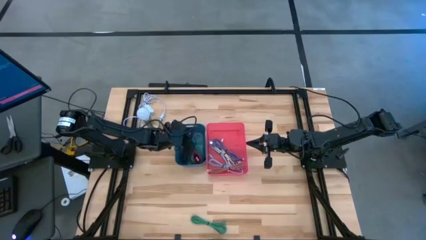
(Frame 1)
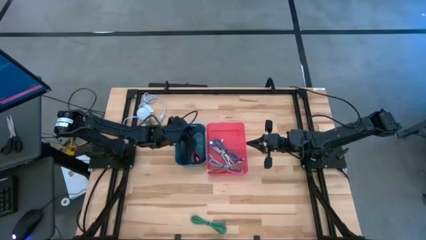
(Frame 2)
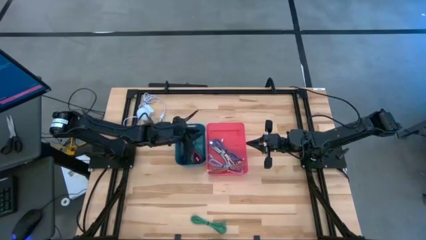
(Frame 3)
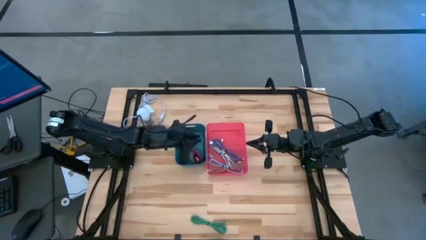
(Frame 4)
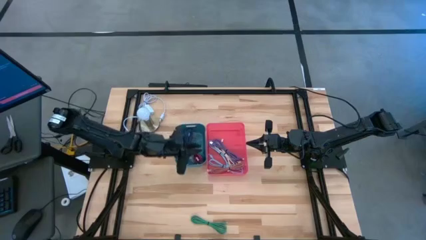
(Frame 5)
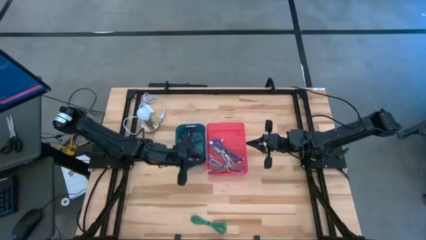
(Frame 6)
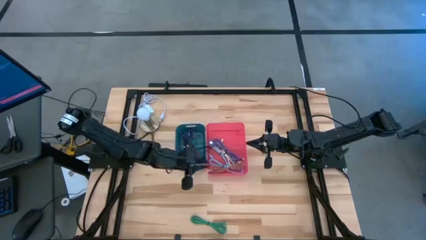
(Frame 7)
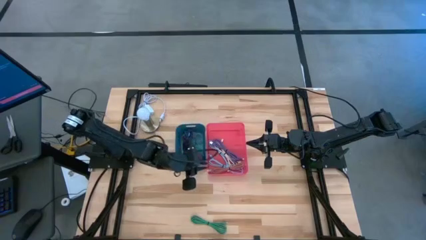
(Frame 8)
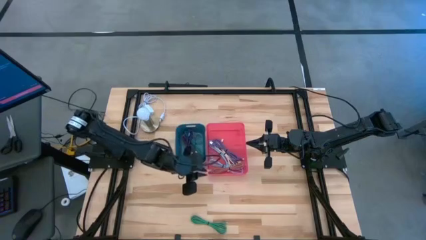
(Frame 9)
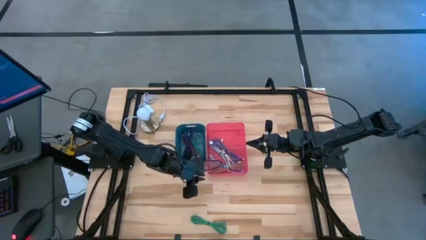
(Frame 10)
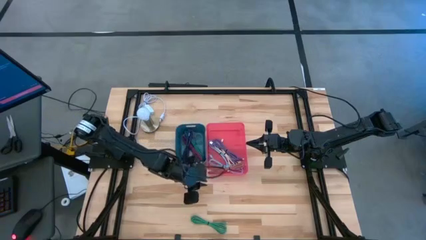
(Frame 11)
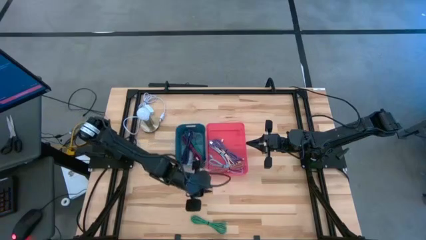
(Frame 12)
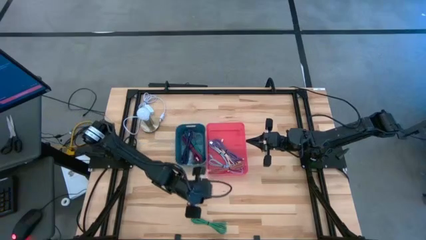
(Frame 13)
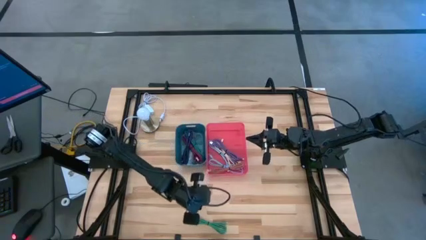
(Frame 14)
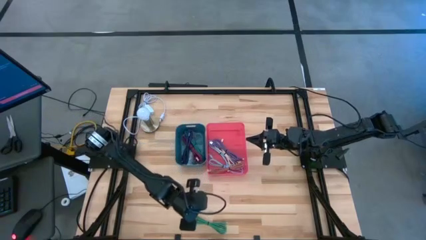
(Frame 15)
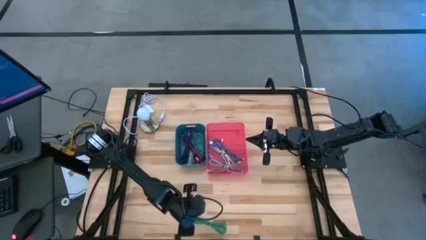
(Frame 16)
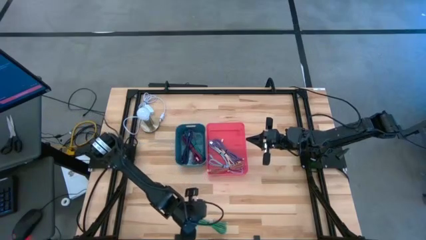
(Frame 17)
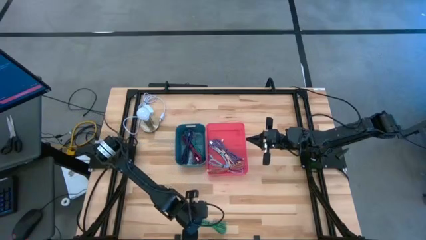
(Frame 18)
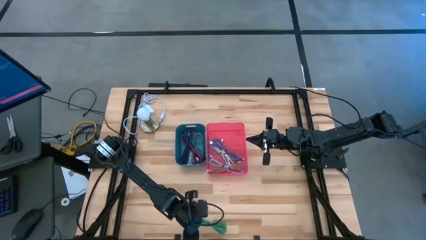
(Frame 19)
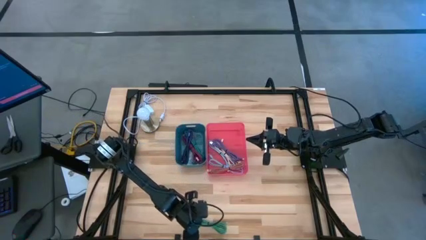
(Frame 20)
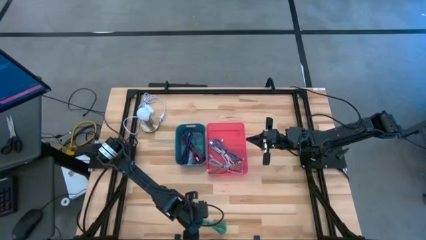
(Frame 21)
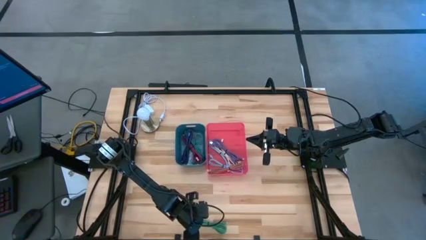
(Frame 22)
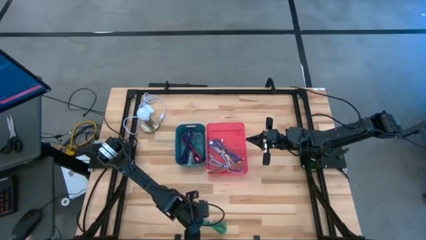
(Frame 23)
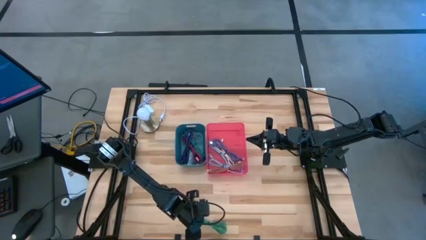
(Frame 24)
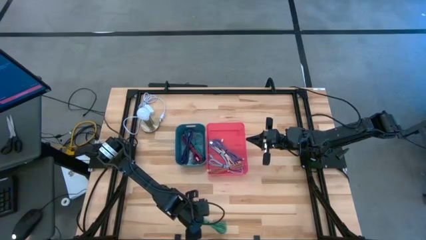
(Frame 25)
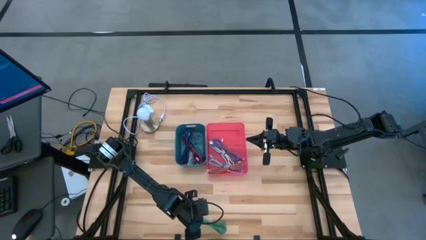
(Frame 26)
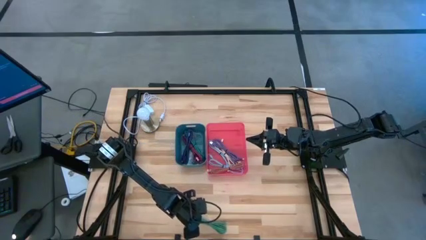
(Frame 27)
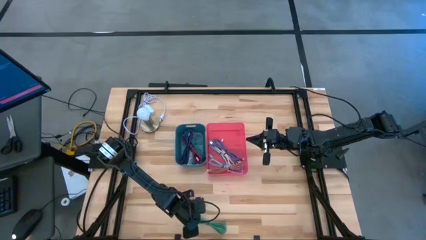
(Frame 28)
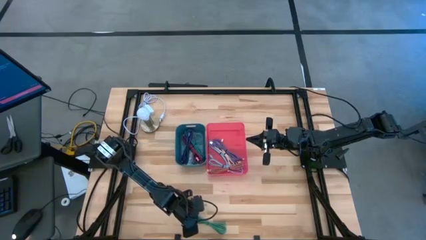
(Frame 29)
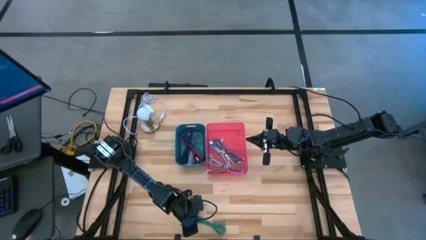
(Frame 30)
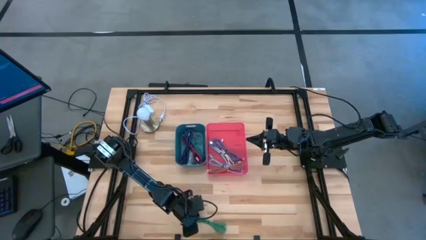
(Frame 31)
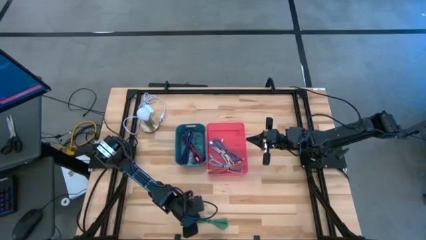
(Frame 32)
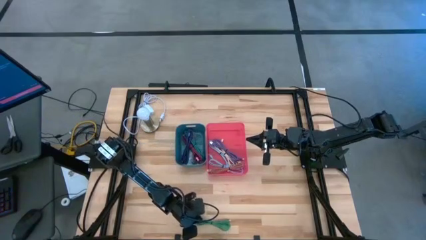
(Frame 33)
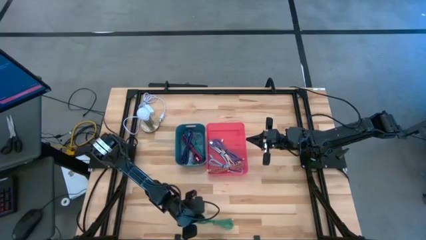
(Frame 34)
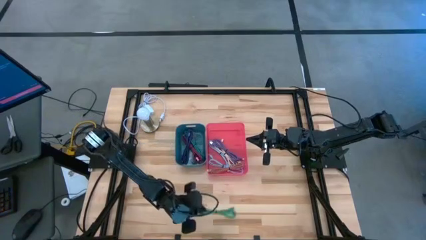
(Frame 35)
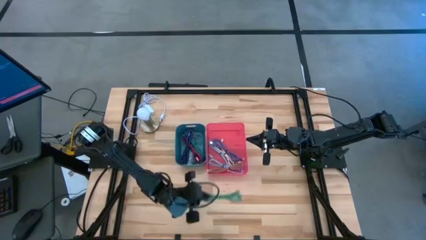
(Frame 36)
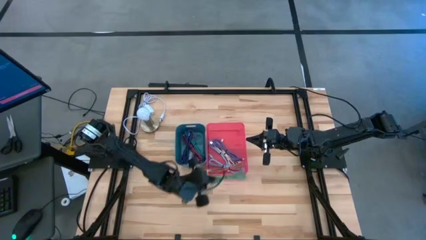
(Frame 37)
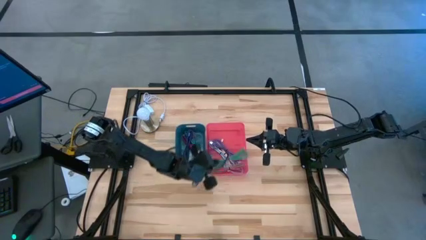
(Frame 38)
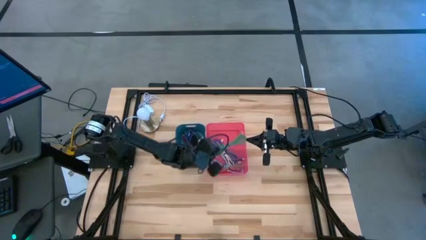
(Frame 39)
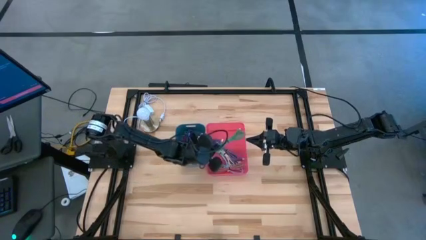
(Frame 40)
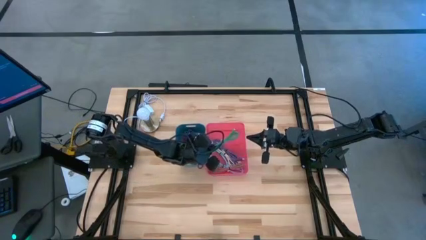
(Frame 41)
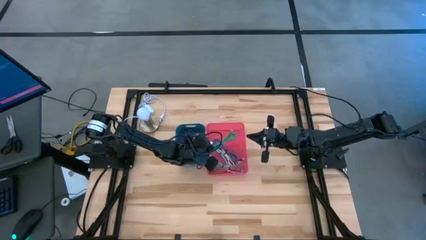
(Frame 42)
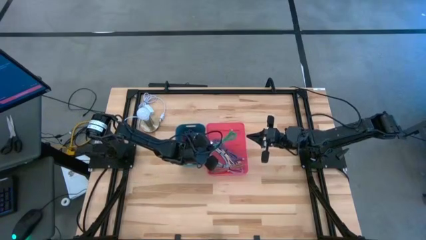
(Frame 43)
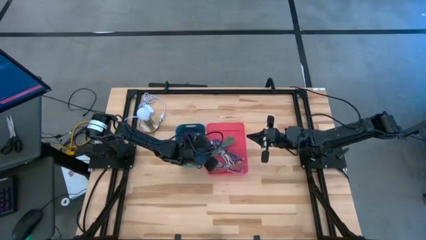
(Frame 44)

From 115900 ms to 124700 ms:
Task: Pick & Place USB Port
Put the green charger cable into the red bin

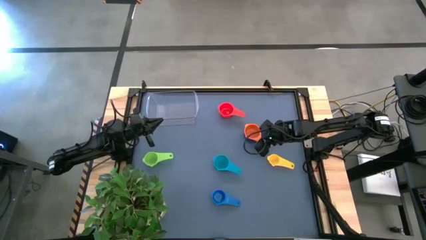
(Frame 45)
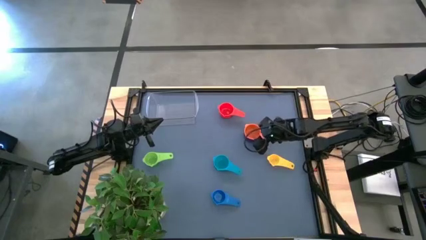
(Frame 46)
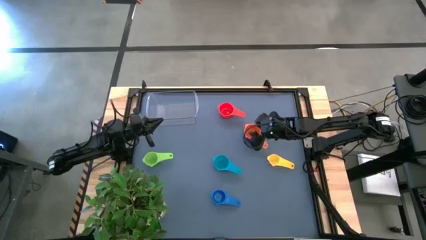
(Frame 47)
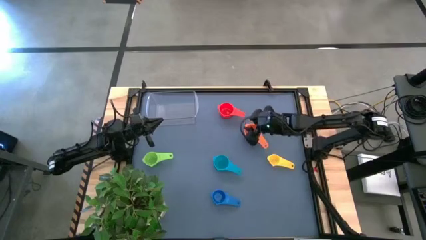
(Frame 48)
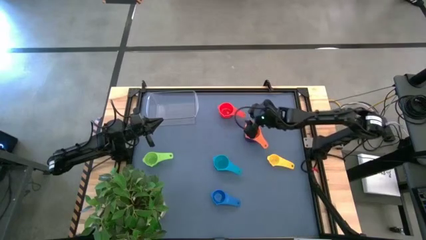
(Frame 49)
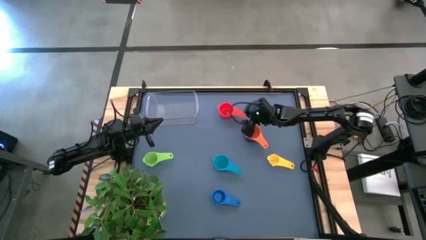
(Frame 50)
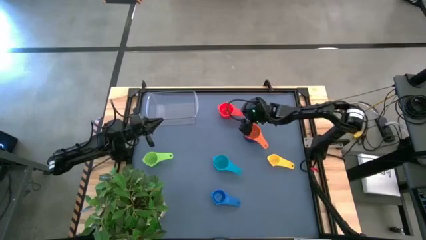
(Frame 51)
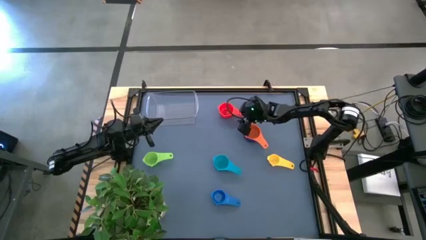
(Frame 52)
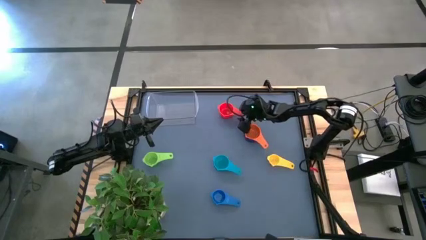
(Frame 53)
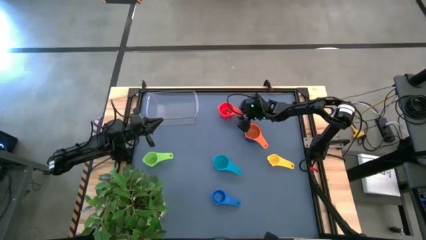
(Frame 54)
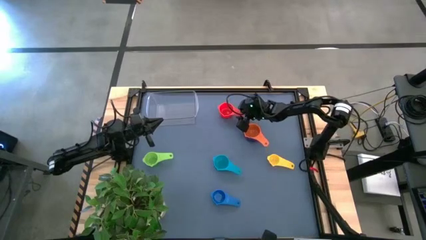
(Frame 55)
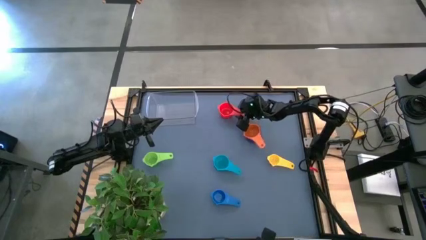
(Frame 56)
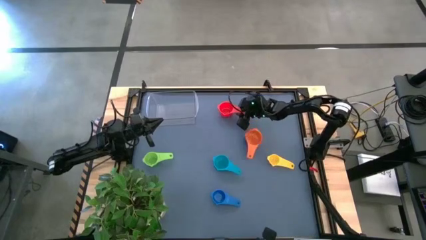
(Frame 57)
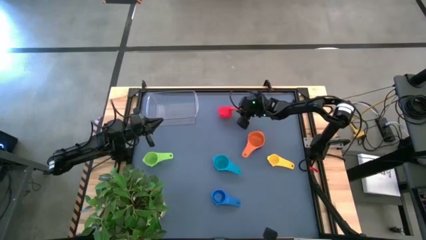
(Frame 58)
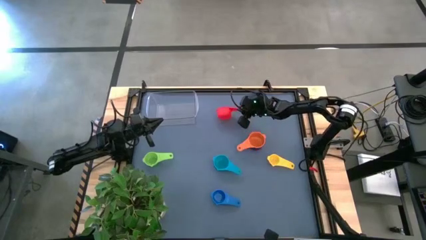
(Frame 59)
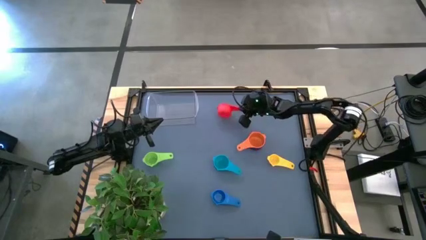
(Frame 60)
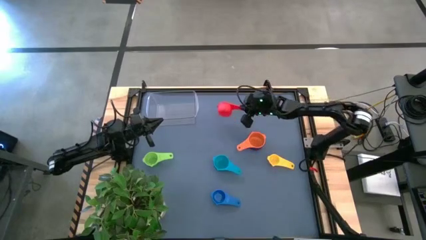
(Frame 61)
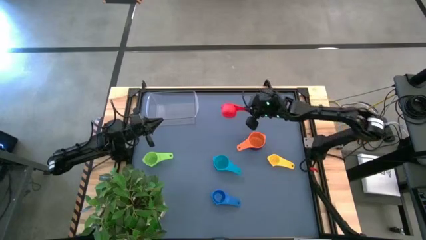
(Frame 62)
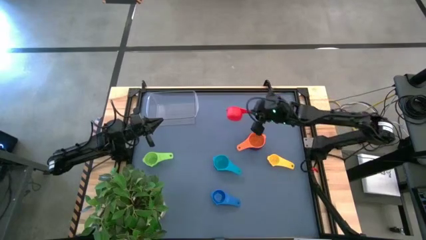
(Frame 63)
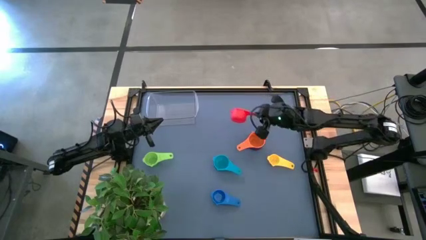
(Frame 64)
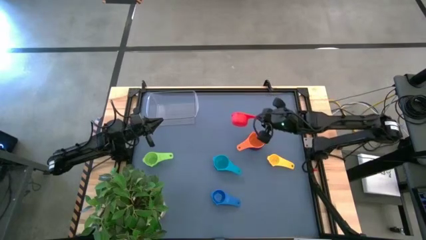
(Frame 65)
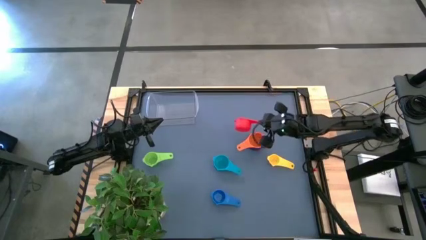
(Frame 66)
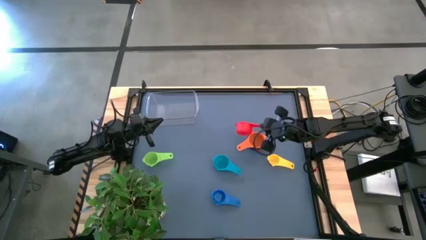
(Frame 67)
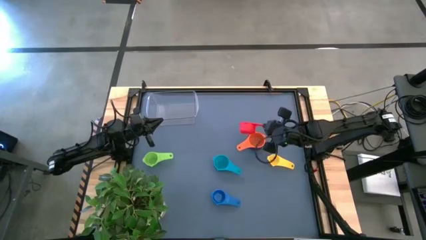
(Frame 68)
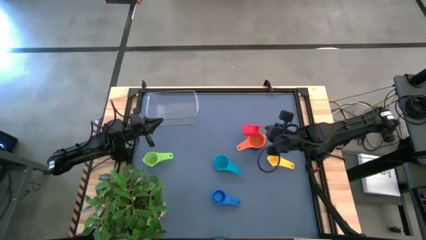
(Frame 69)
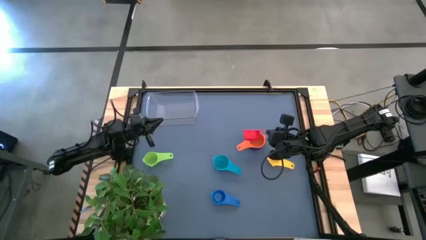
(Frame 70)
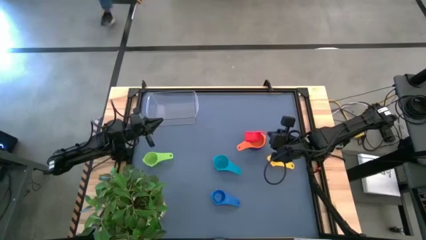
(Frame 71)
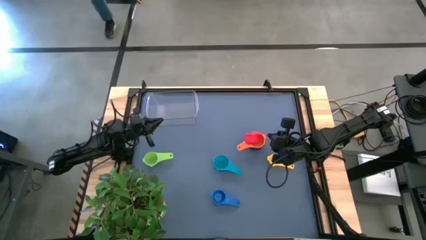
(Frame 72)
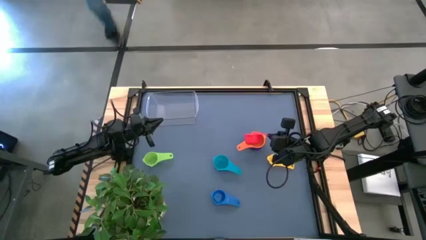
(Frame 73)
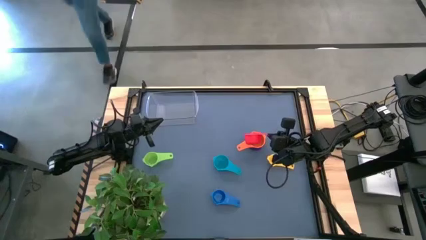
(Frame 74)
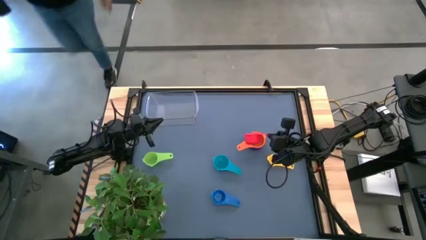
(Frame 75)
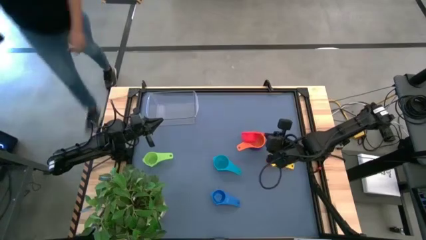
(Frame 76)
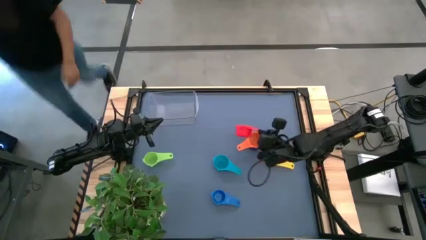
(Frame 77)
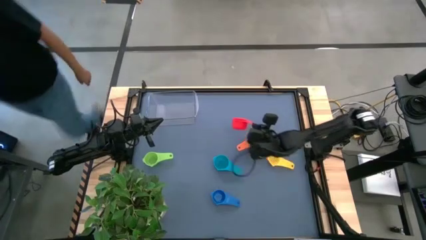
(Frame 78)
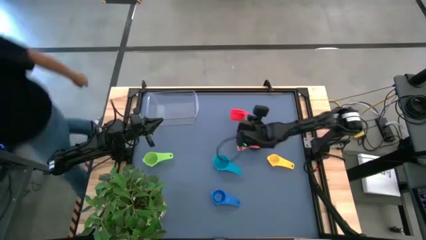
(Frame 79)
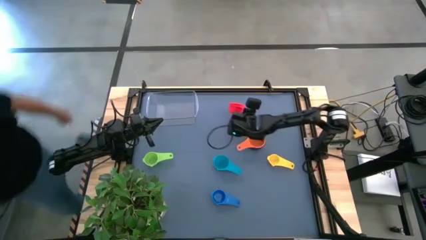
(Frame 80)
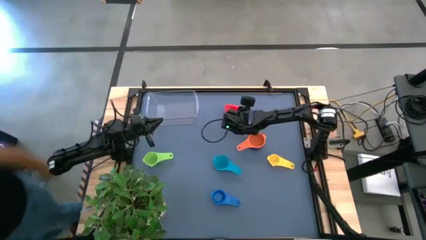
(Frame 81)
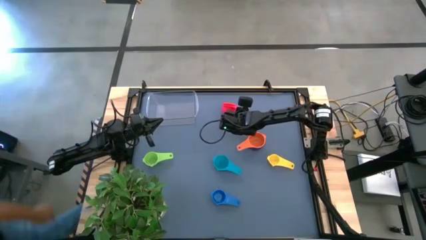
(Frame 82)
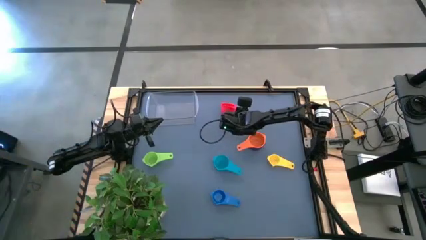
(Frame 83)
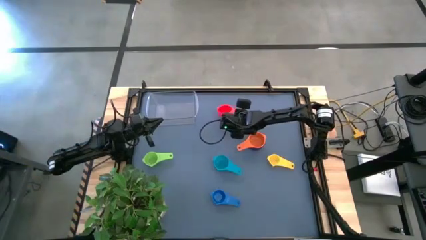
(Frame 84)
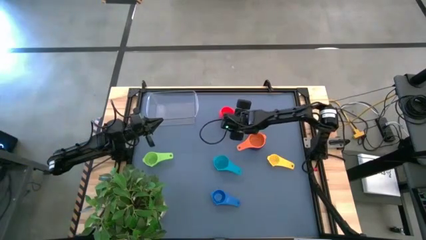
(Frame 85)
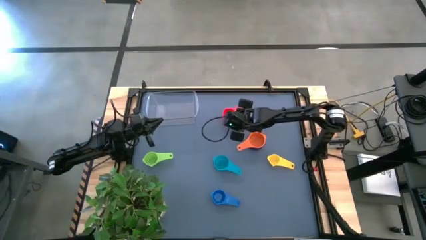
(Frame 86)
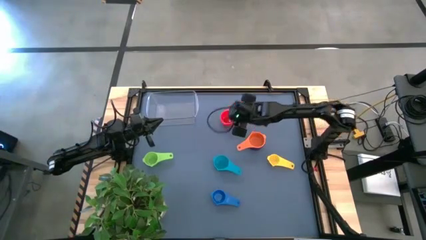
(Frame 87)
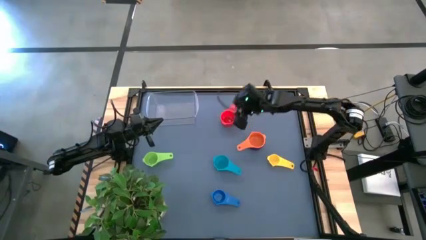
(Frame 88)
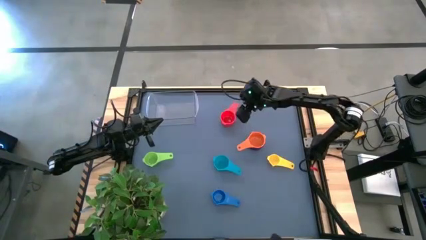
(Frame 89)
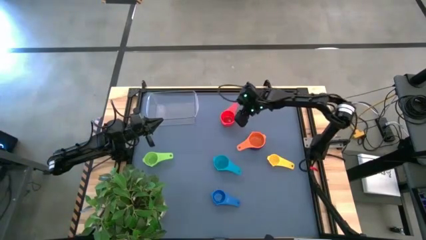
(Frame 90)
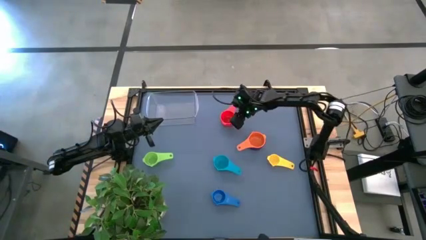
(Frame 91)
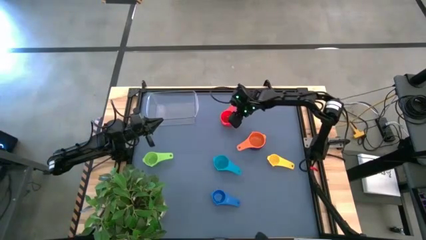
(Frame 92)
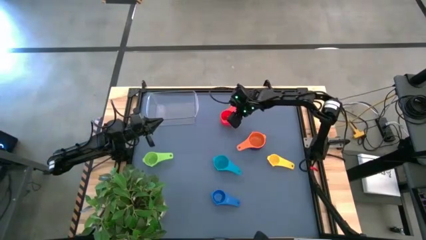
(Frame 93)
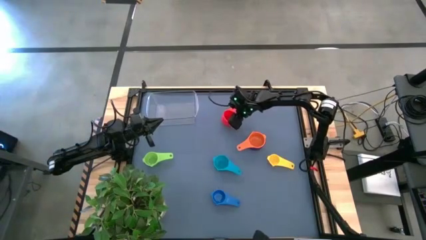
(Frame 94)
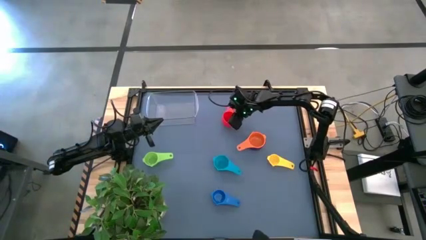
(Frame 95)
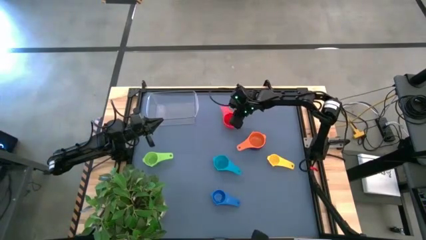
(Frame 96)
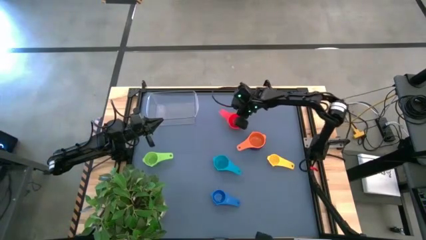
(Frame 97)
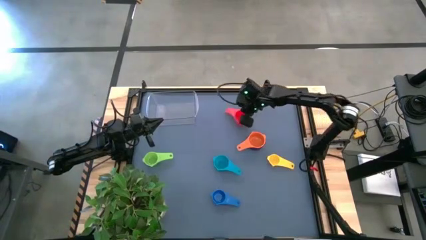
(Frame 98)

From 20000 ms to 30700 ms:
Task: Nest measuring cups in basket
Stack the red measuring cup on top of the orange measuring cup
